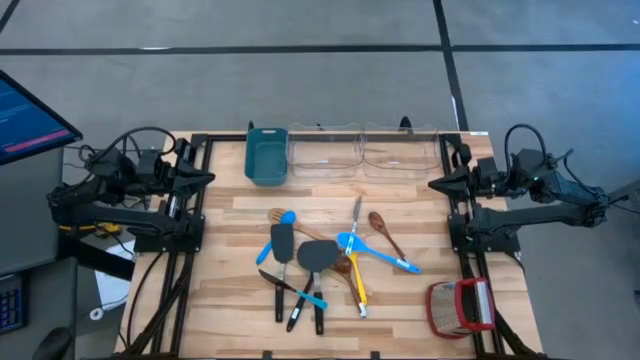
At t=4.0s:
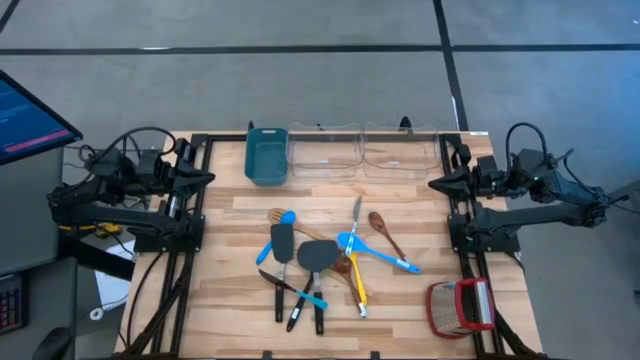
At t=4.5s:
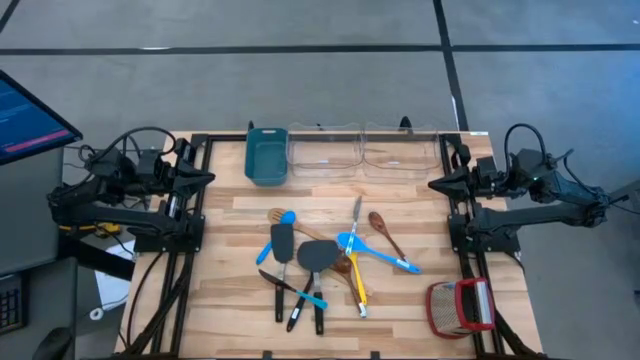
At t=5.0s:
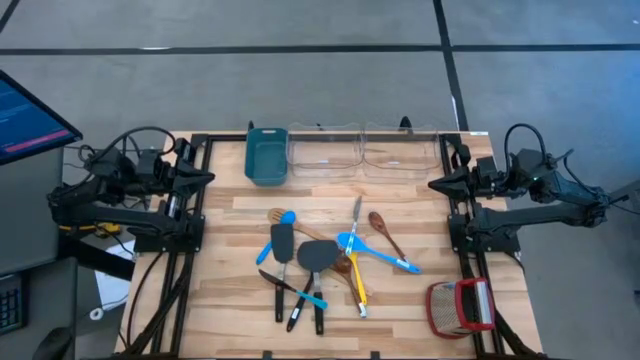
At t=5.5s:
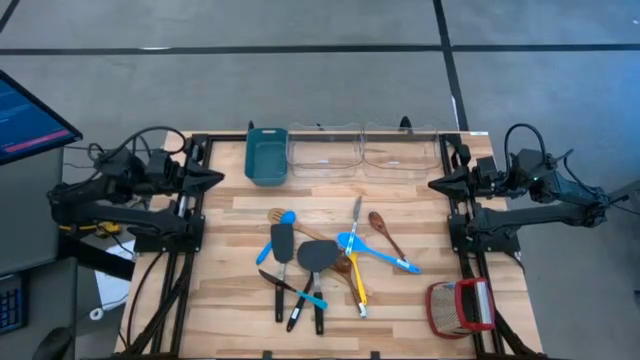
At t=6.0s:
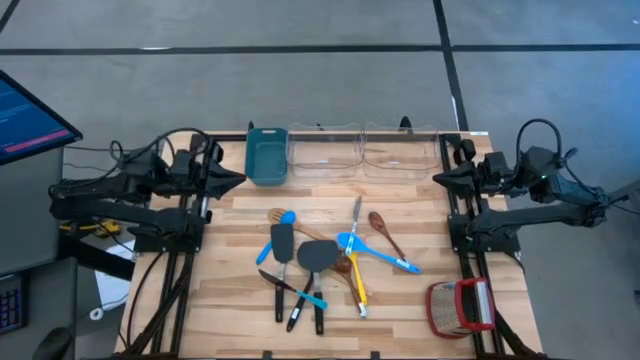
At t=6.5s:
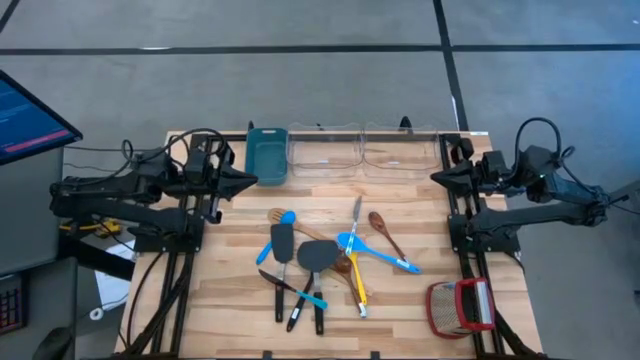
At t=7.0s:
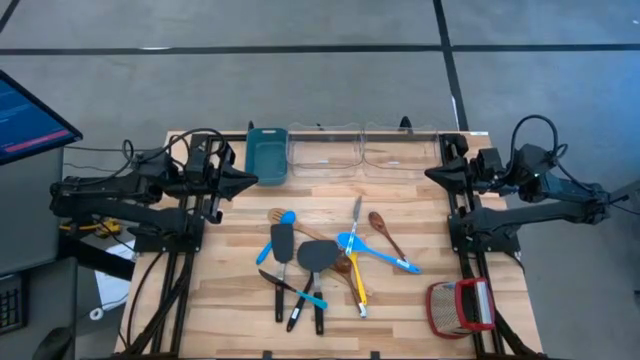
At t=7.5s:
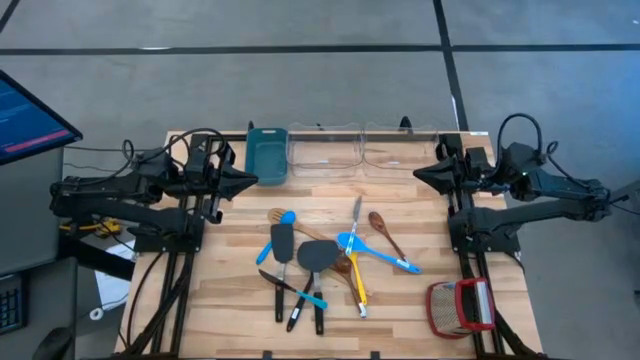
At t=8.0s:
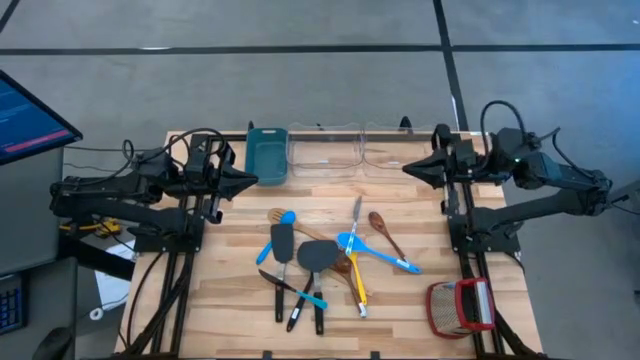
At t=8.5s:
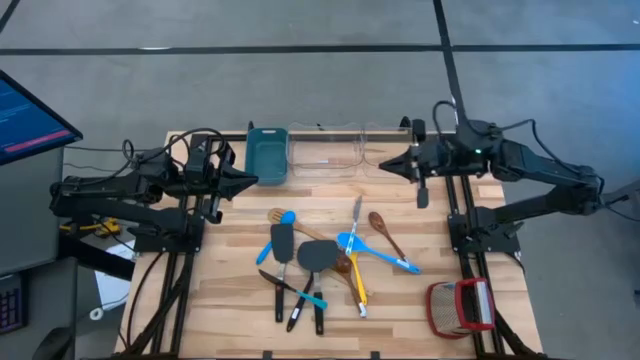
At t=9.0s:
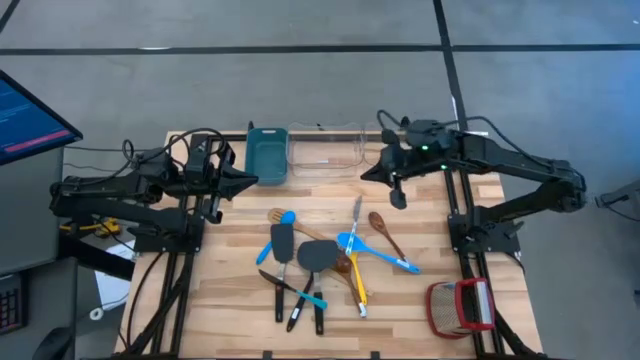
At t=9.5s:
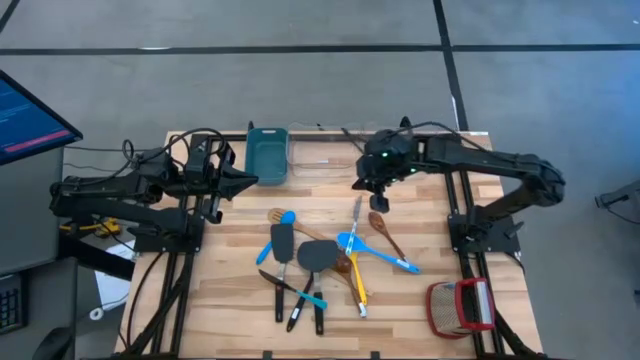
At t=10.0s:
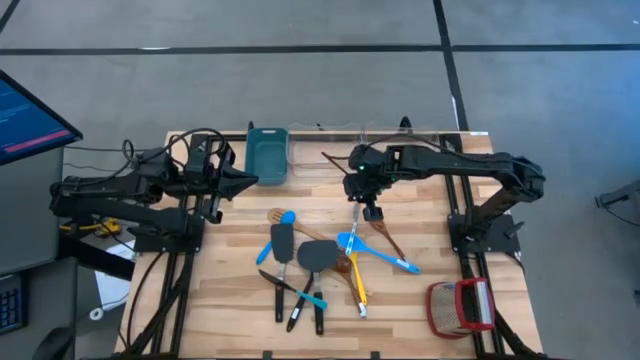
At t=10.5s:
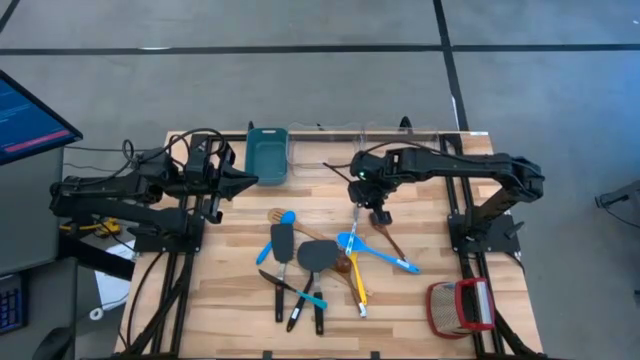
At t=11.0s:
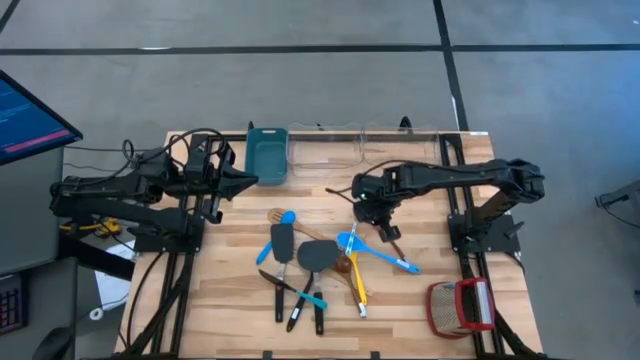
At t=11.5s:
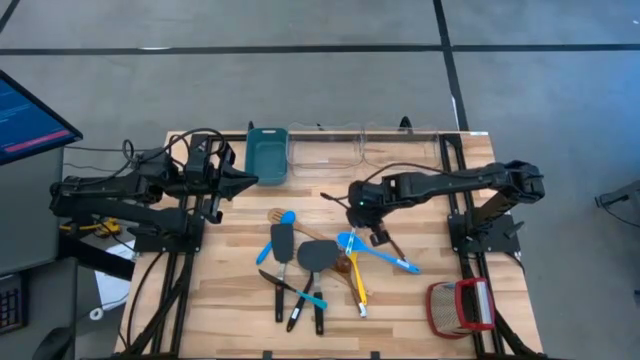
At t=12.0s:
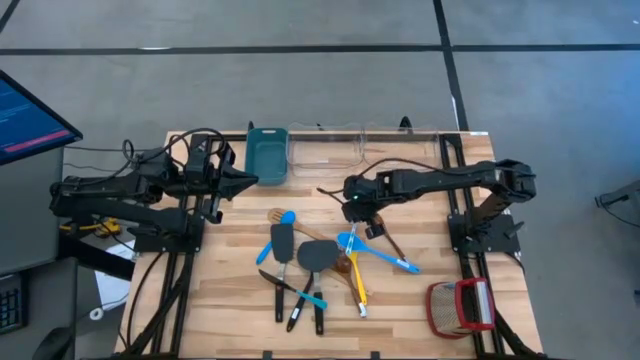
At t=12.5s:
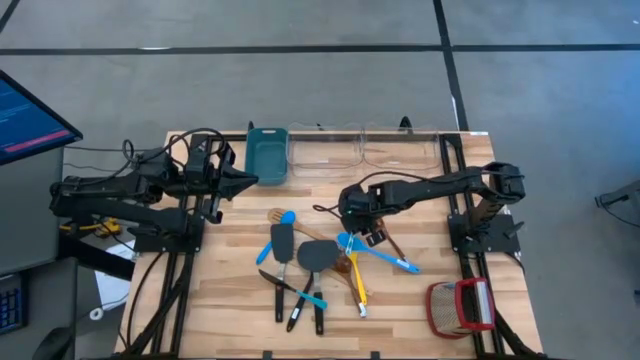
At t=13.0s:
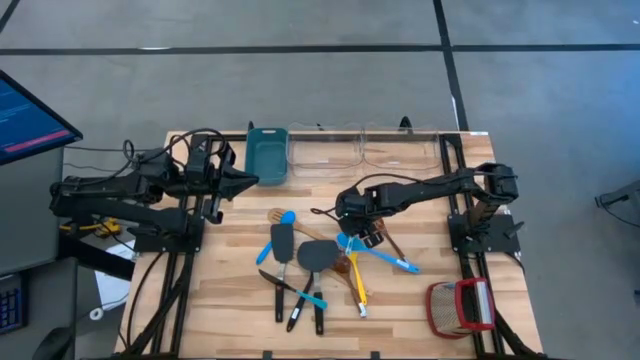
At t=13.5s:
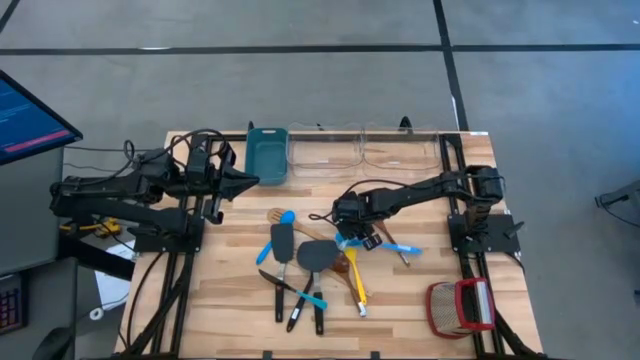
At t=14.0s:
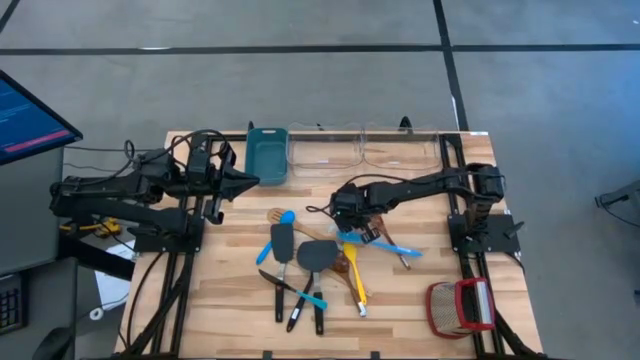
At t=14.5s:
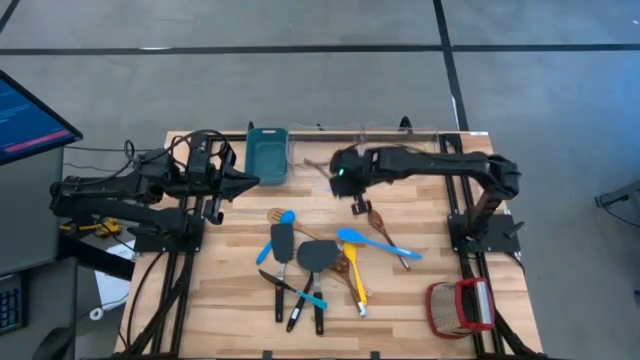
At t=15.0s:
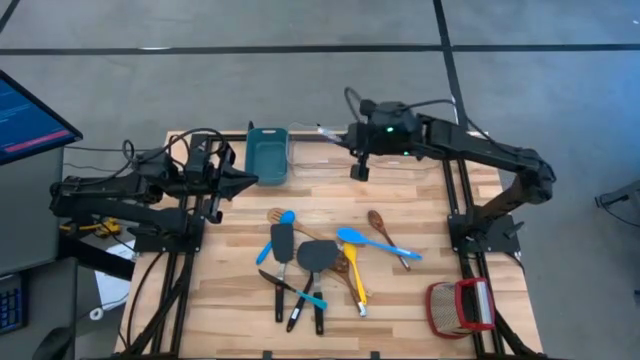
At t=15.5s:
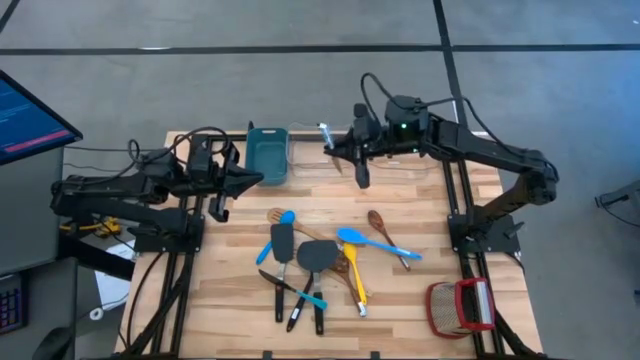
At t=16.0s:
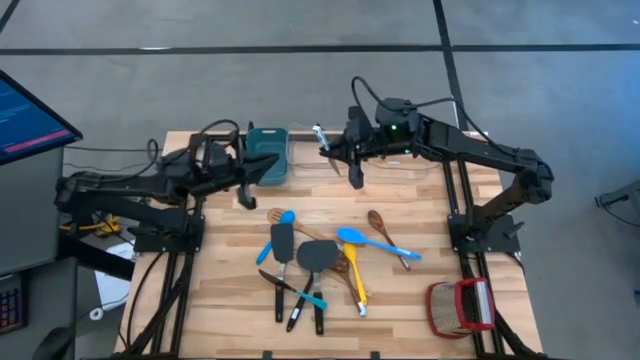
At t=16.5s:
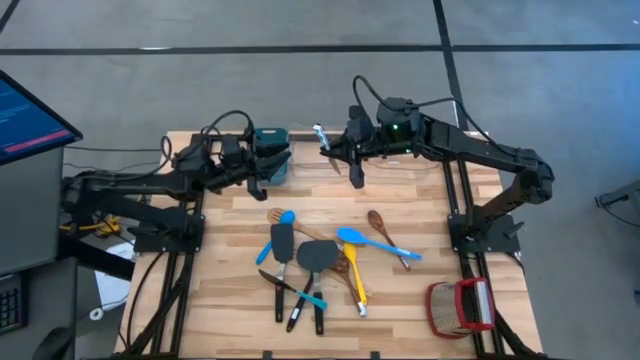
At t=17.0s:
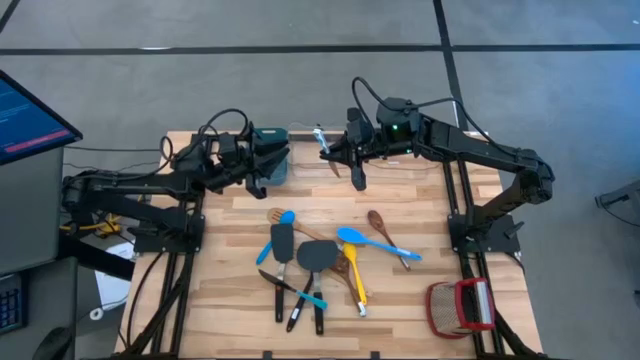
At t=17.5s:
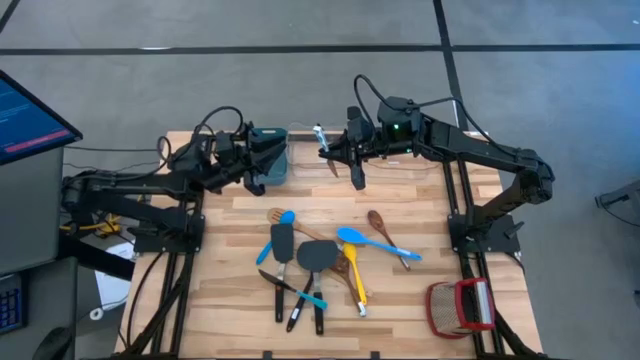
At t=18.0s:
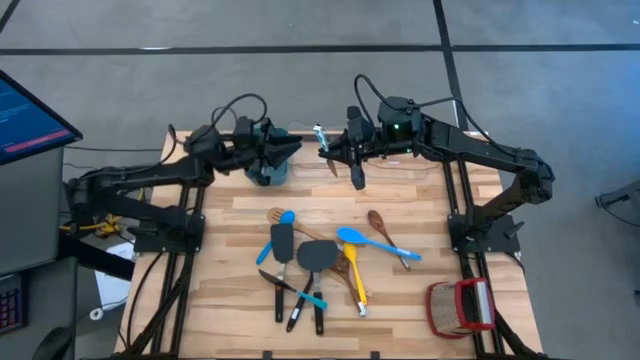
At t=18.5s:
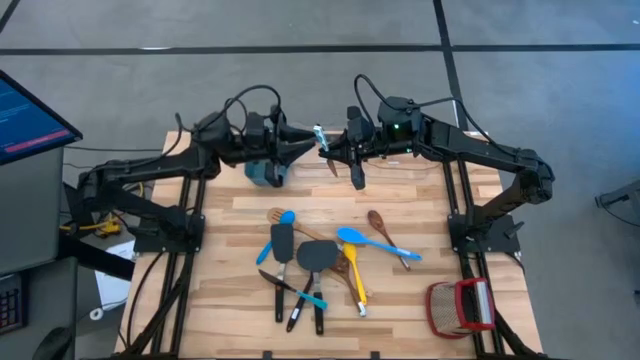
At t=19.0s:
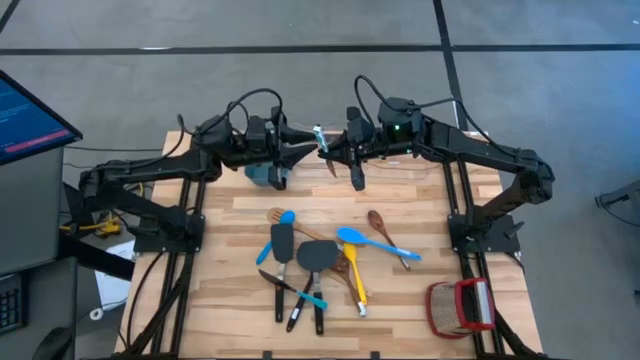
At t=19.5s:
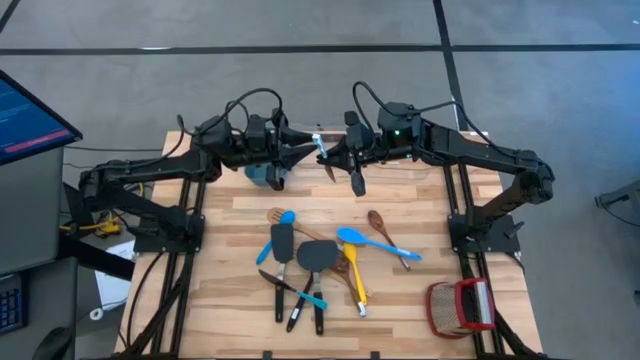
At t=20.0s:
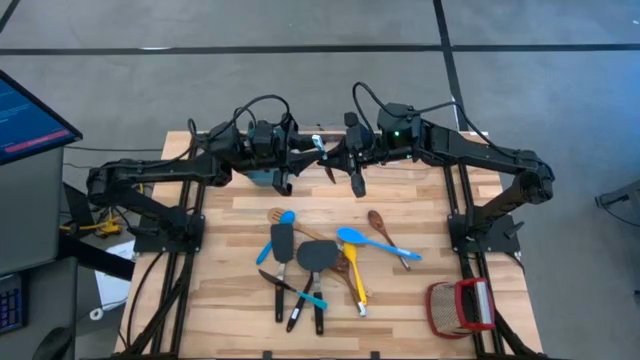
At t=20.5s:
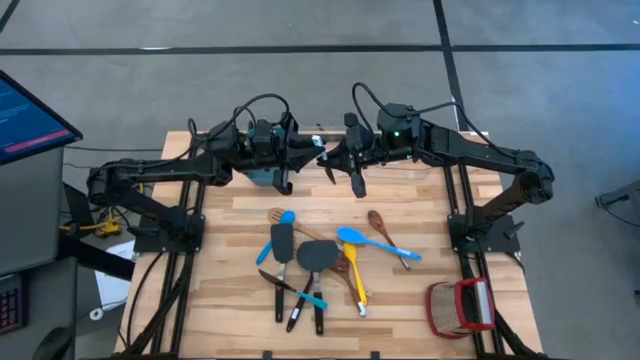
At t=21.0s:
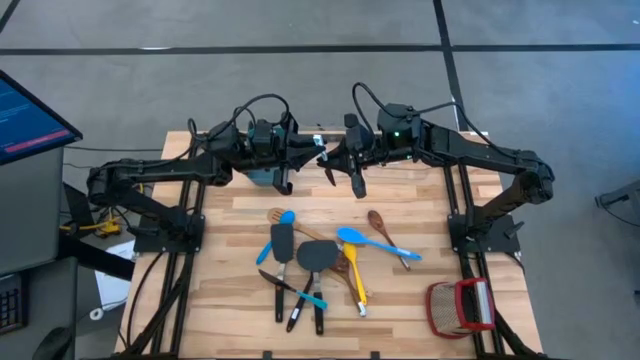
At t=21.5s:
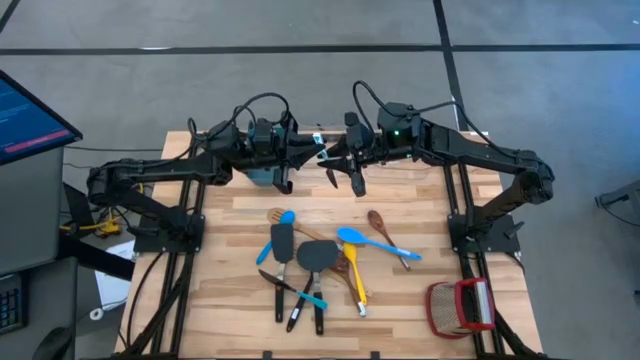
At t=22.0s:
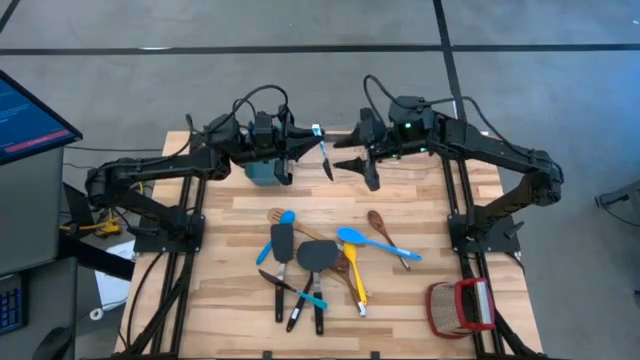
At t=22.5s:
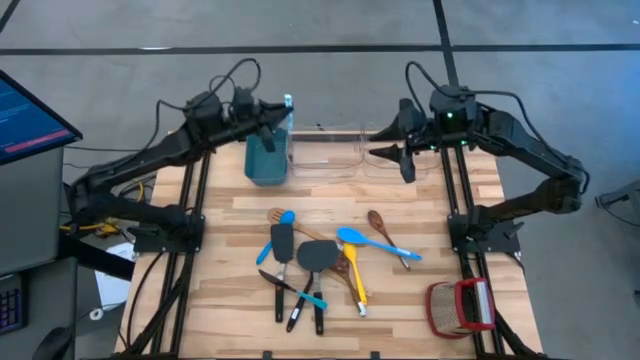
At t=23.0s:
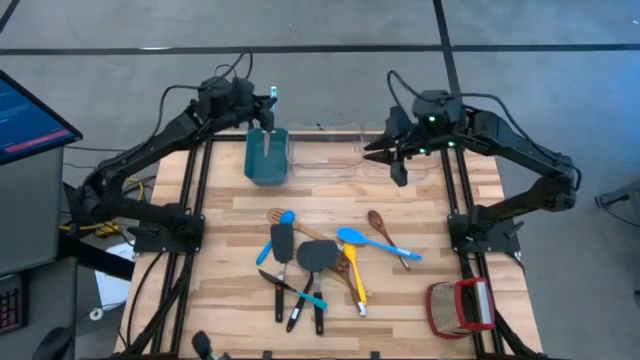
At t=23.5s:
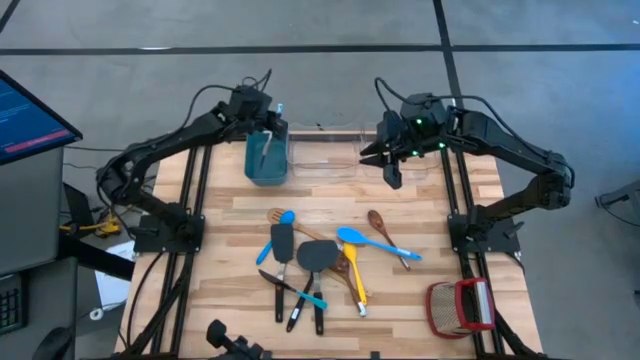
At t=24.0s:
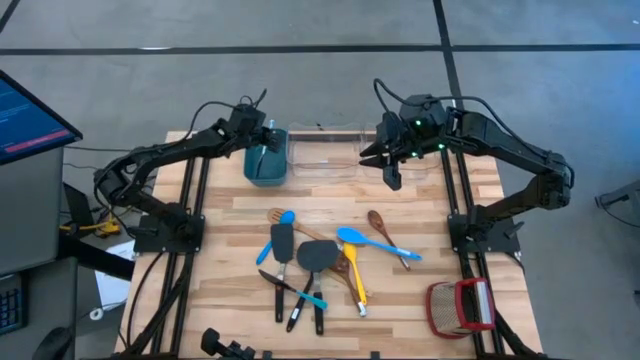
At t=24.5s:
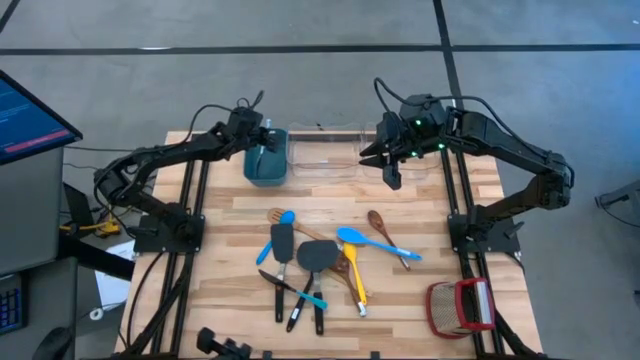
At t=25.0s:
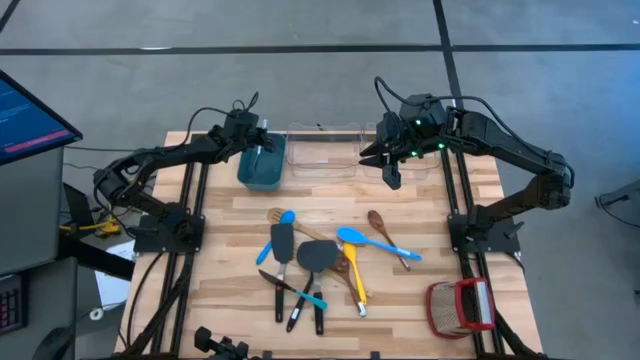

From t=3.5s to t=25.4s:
Task: Pick & Place Kitchen Items
Put the white knife into the blue bin
